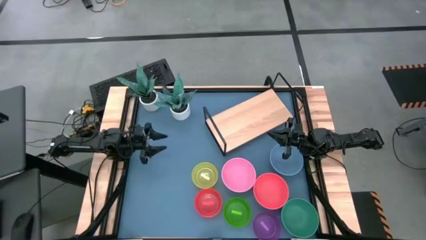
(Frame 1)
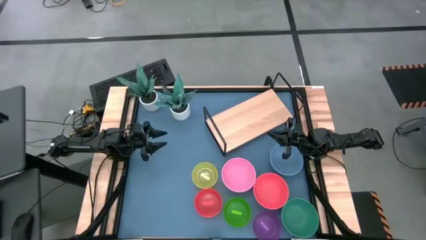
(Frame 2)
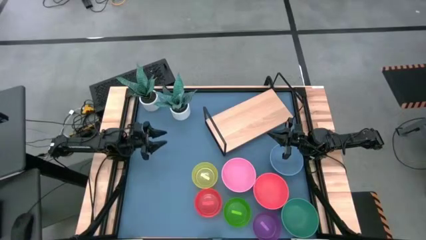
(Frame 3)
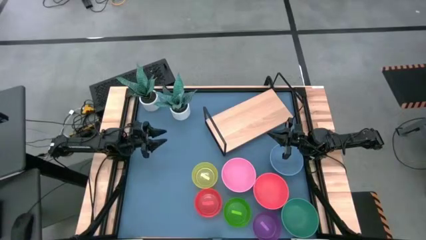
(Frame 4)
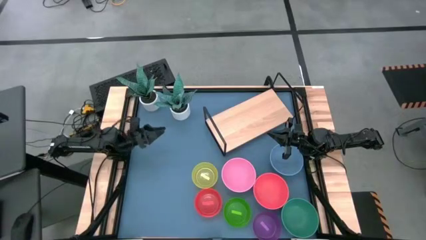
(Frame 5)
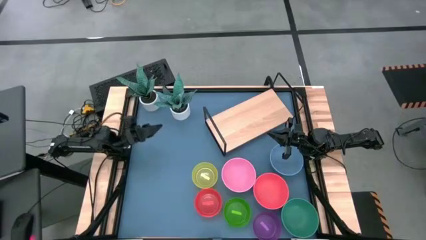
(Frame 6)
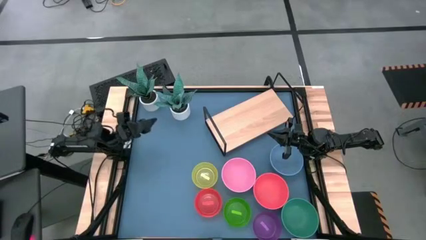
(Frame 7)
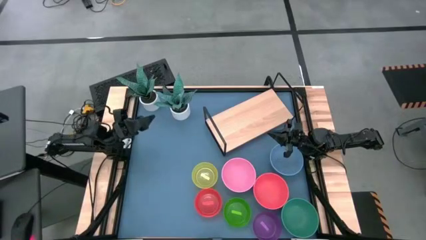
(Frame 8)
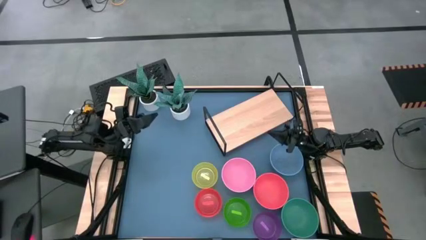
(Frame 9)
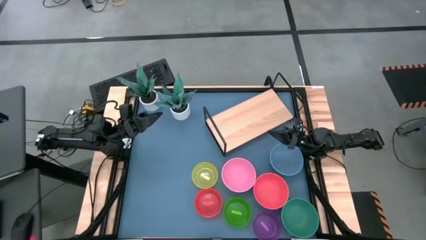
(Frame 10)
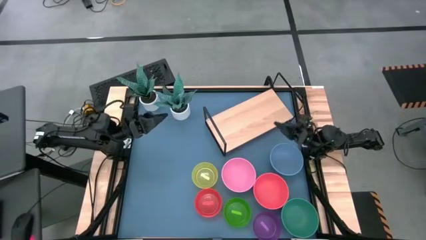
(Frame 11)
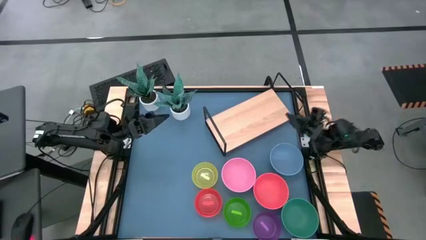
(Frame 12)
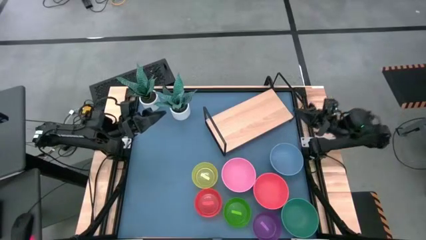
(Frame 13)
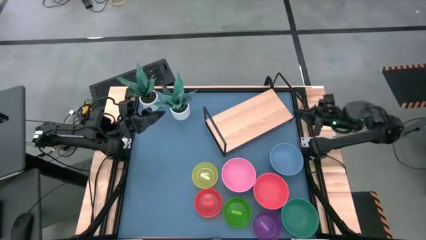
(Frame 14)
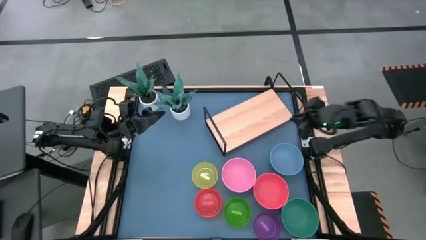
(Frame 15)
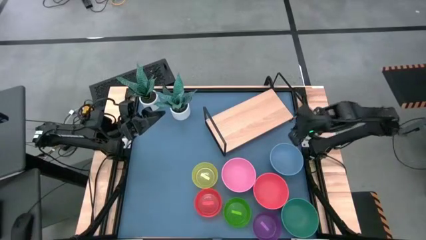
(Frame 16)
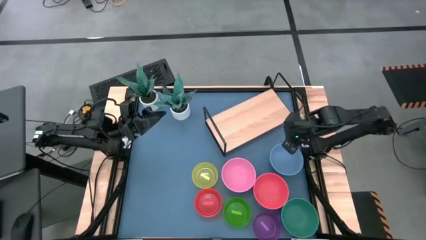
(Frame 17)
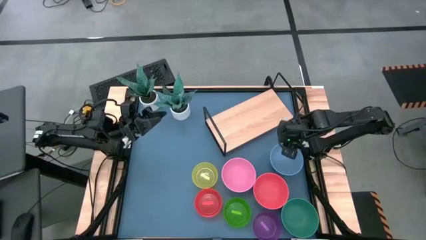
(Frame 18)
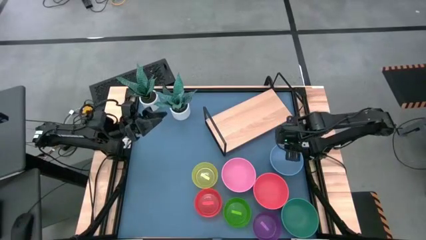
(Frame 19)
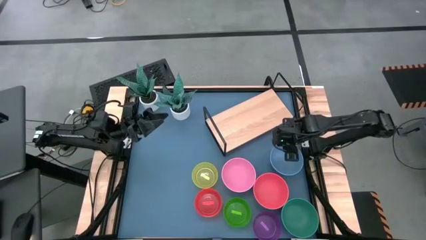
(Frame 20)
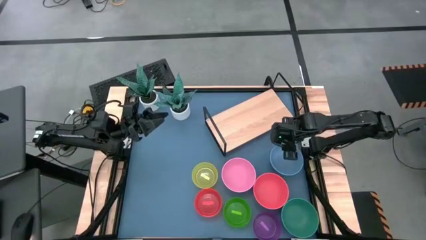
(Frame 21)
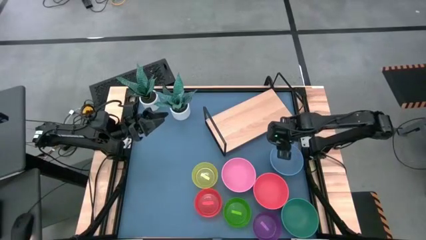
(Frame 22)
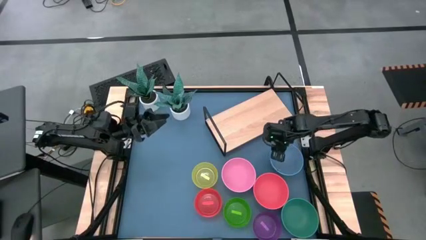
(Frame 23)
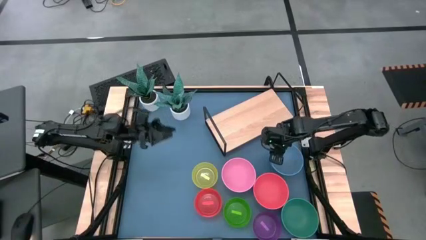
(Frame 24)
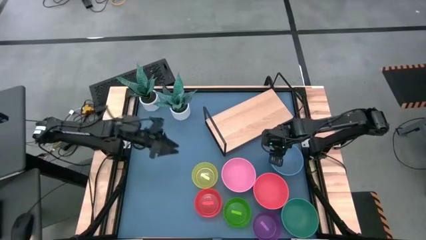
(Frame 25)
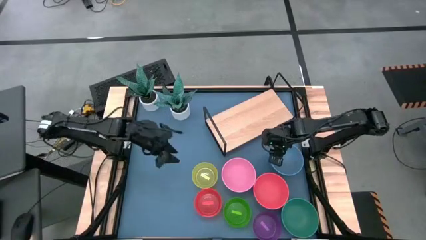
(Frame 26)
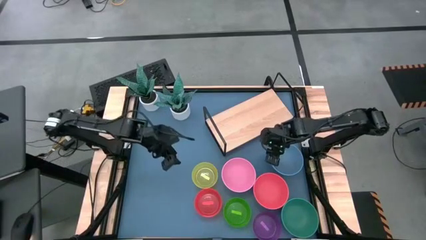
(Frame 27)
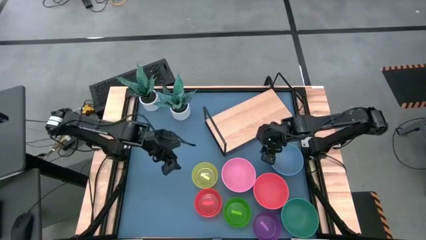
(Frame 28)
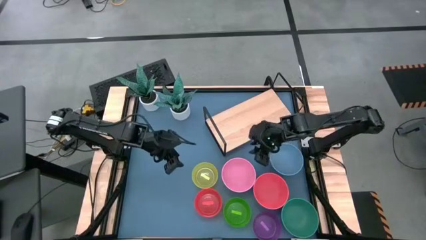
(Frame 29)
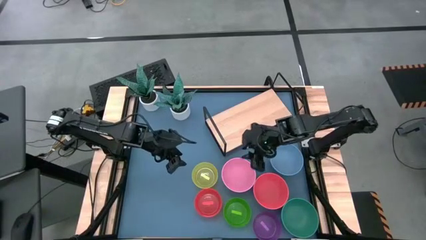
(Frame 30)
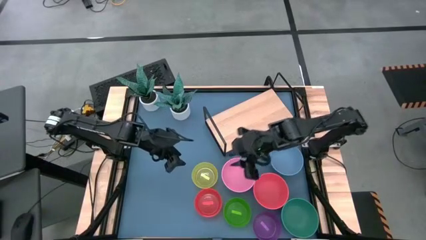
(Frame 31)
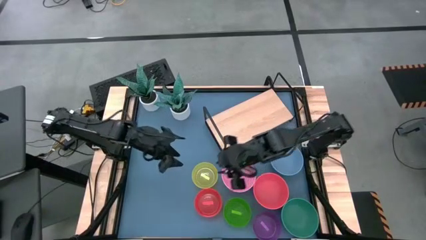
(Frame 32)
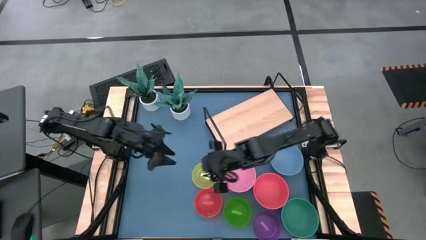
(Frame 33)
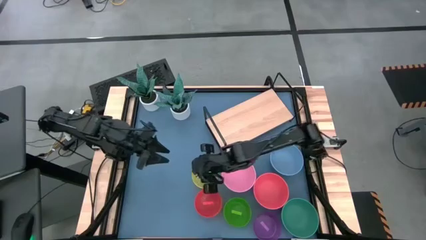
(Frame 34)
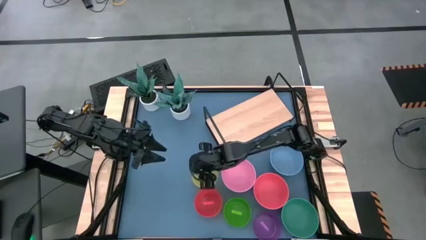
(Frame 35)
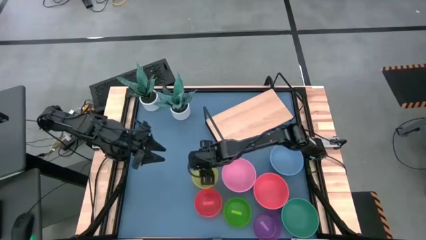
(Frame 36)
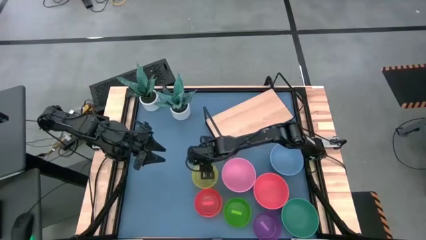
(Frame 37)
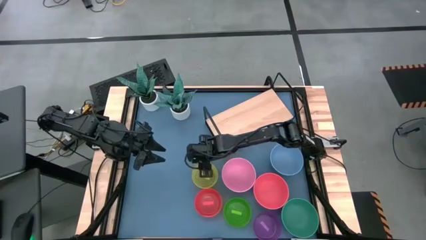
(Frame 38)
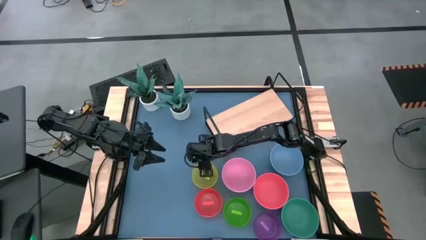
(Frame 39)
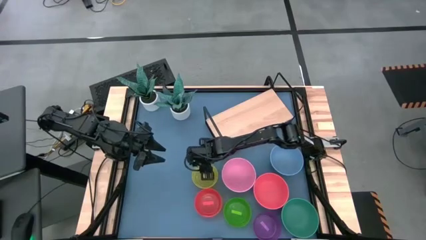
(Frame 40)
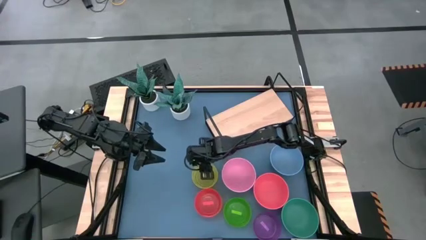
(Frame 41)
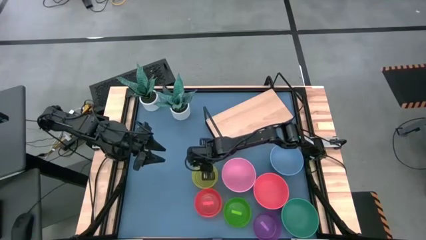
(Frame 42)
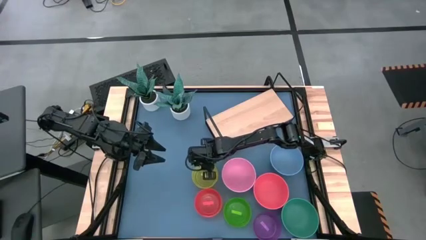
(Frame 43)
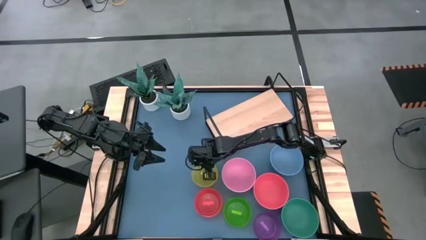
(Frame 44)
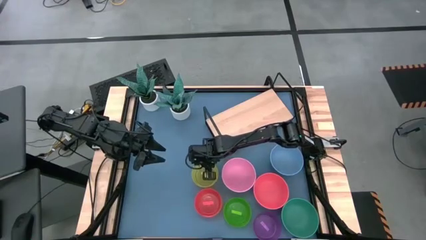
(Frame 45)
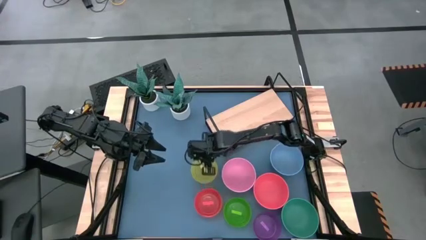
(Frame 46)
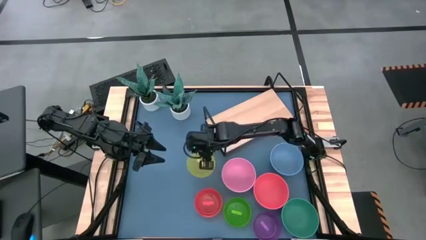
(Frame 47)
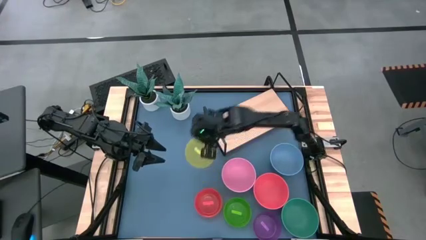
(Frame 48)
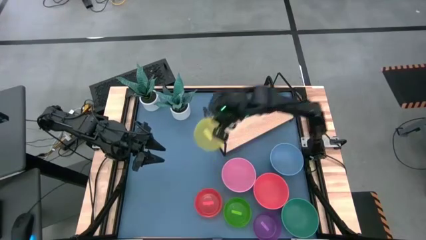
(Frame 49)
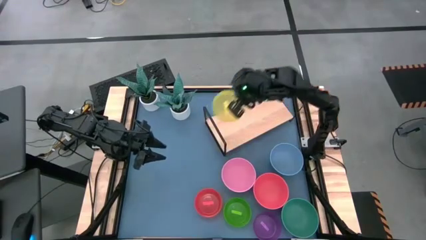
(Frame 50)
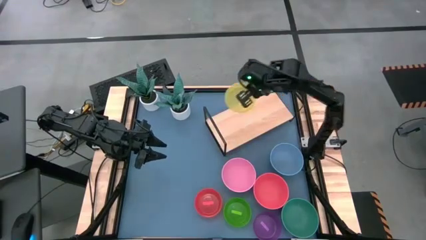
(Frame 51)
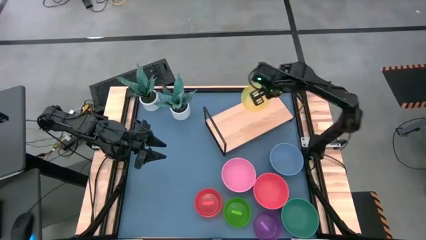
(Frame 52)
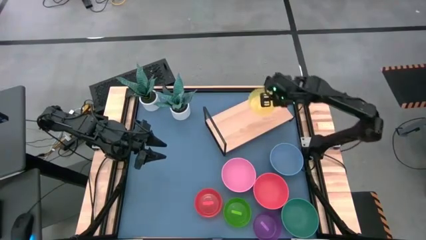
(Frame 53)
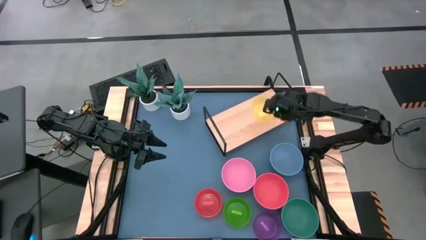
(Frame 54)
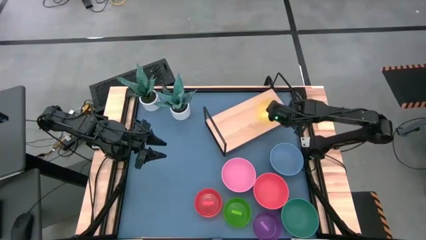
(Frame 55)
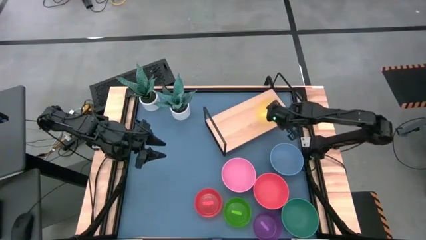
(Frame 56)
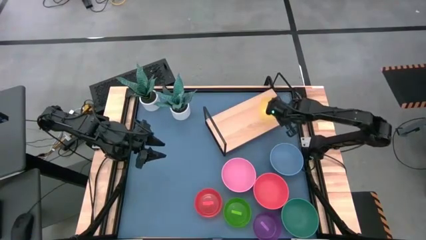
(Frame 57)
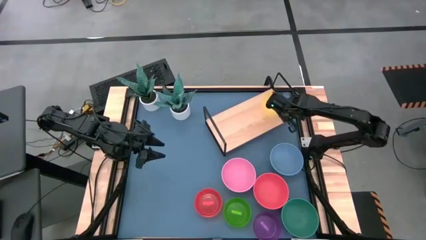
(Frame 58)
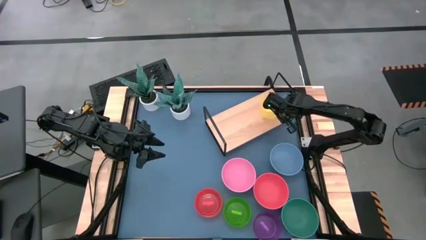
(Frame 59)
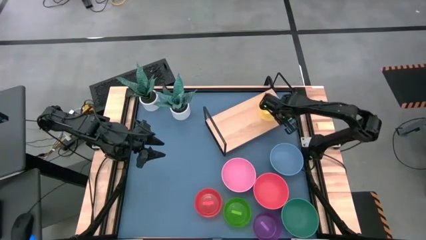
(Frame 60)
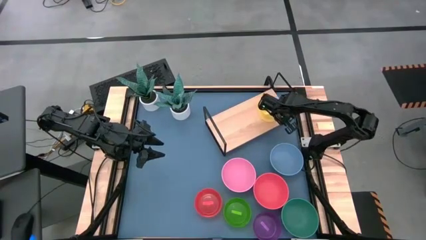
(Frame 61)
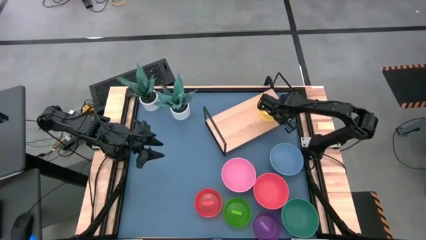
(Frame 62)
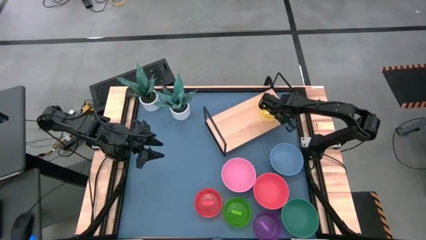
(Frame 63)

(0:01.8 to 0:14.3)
Task: Place and stack bowls onto a shelf
Put the small yellow bowl on the shelf
